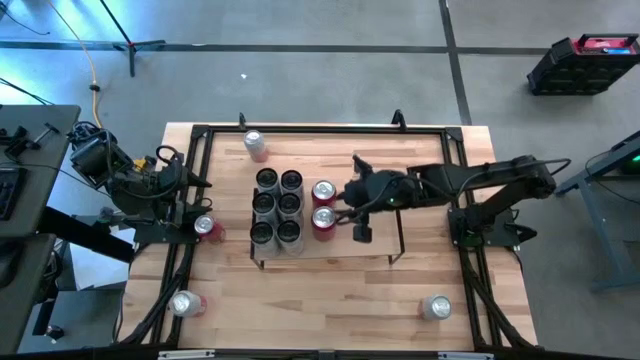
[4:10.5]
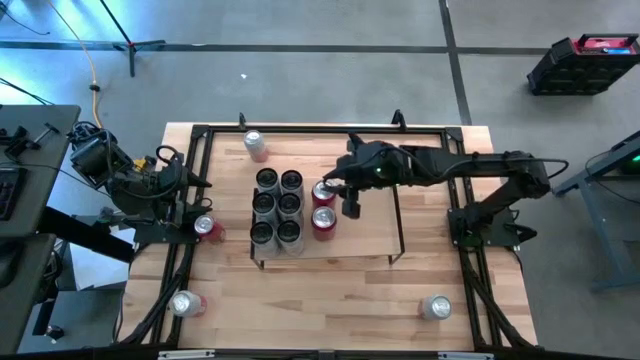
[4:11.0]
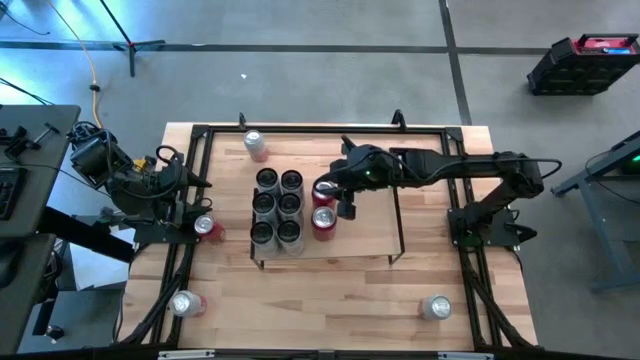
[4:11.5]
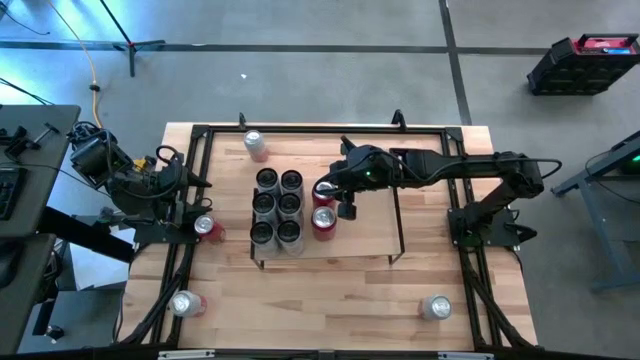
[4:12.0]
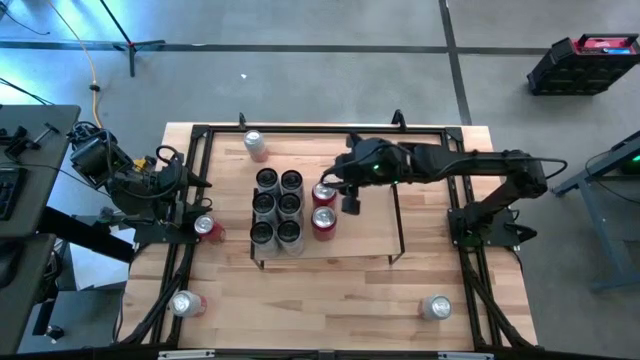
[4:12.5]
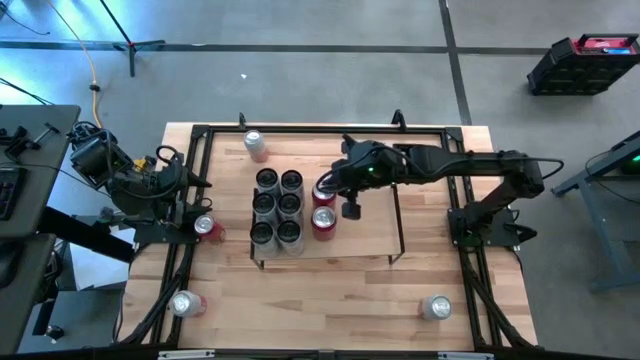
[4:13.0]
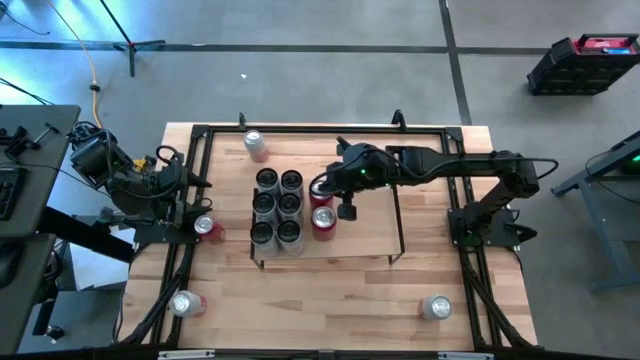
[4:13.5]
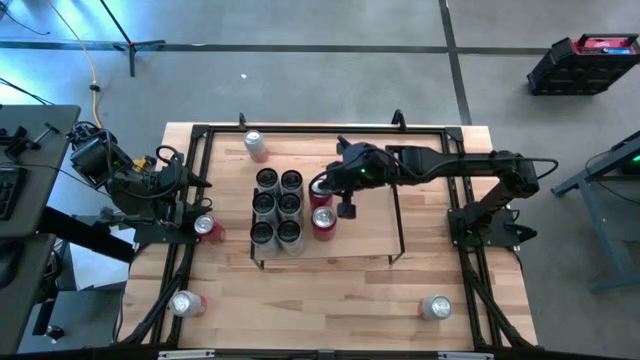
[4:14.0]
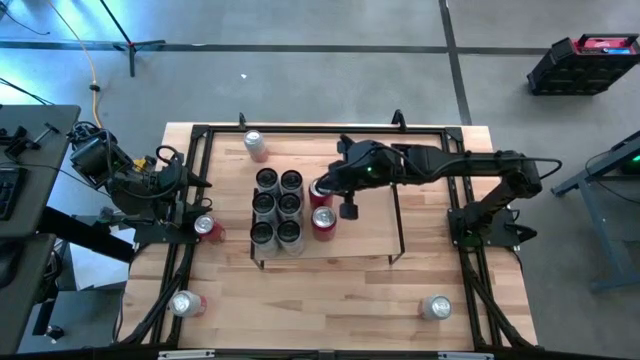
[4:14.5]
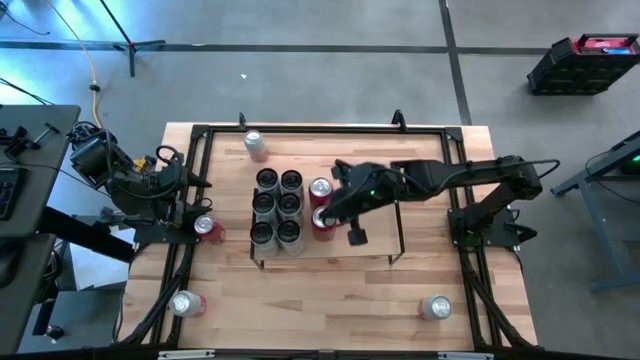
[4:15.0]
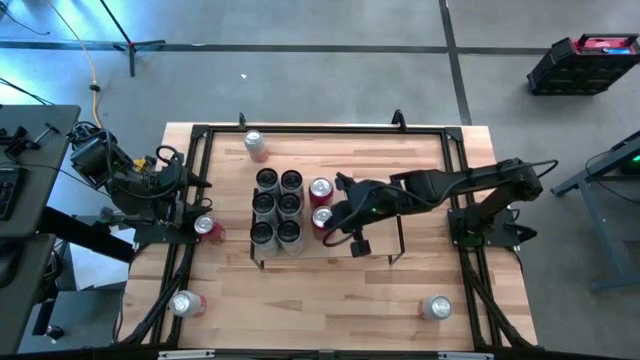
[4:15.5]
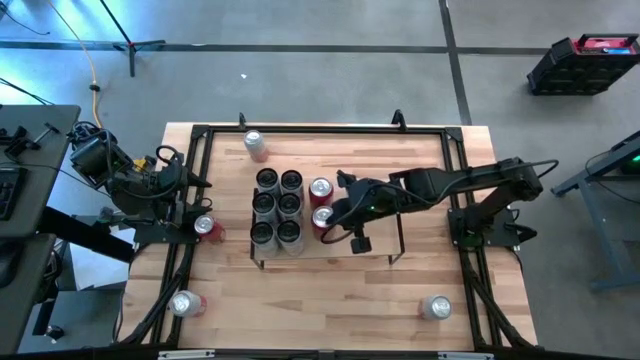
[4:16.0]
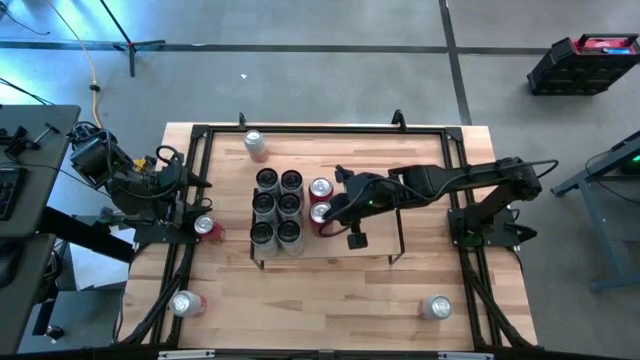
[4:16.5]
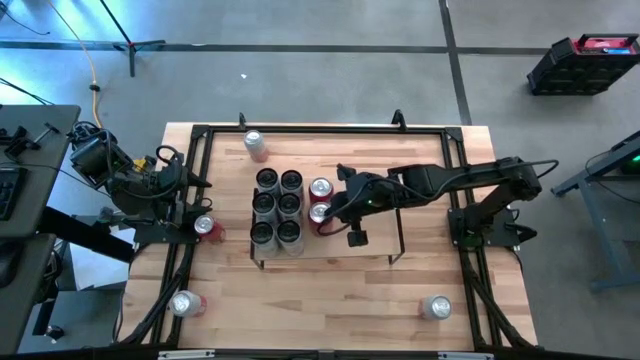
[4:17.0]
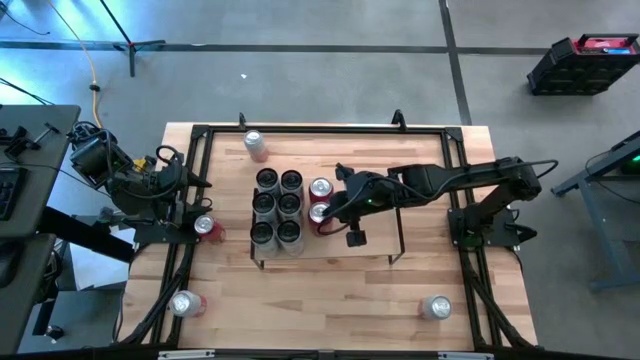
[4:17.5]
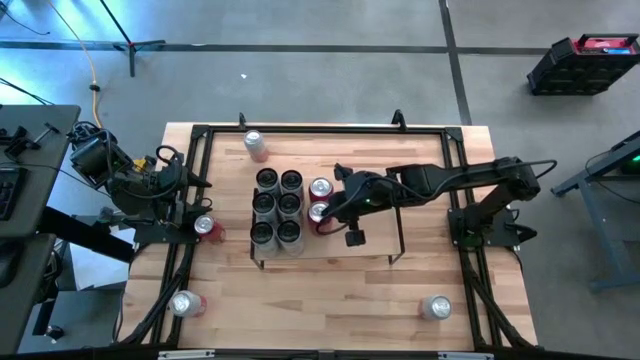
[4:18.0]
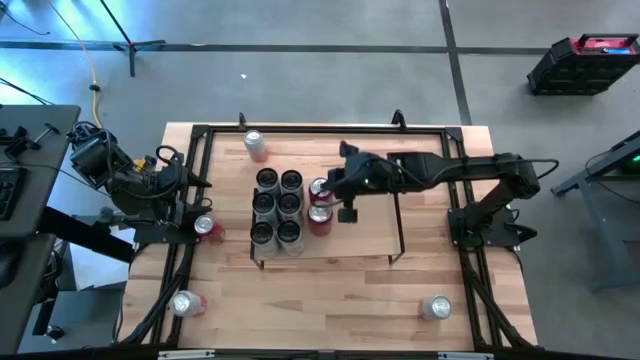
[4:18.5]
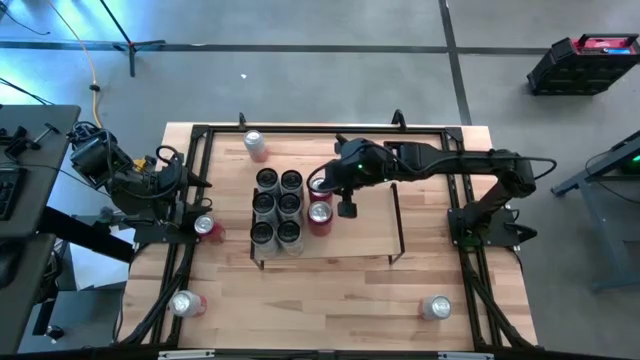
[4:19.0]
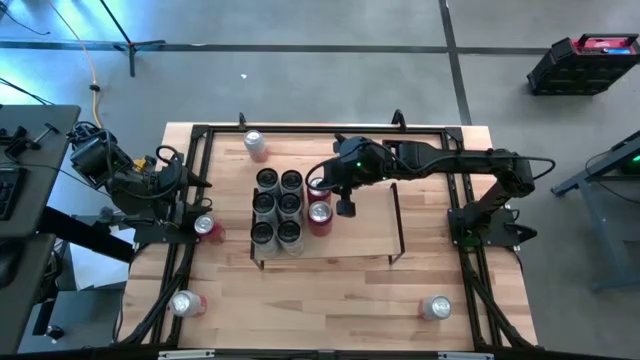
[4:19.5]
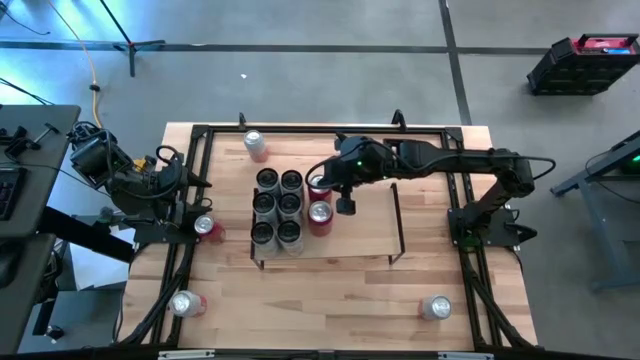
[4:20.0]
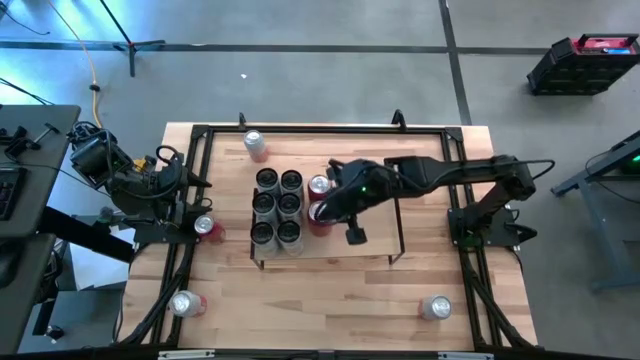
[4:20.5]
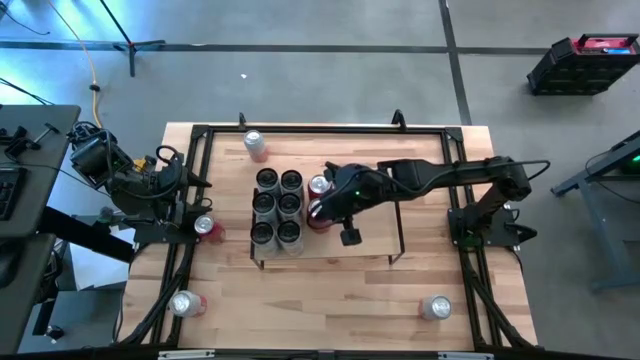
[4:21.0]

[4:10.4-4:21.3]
Task: Place canned beverage on shelf
Adjust the red soda cans on the shelf

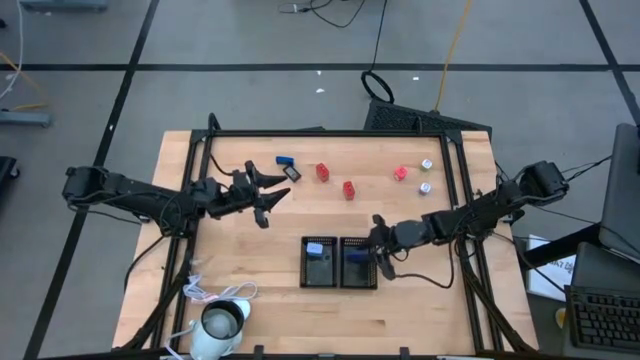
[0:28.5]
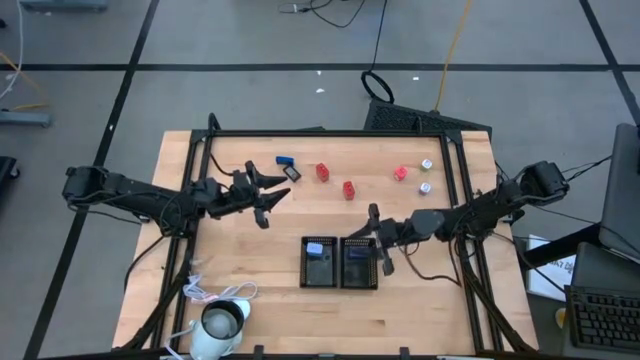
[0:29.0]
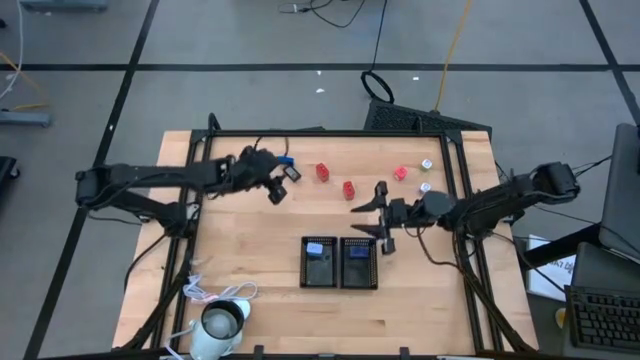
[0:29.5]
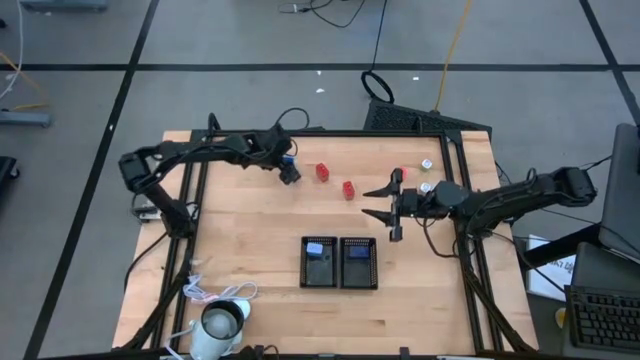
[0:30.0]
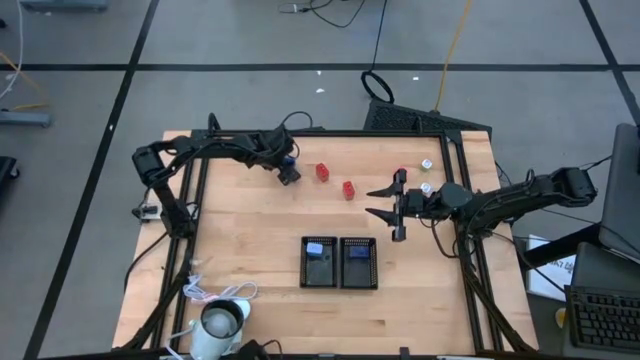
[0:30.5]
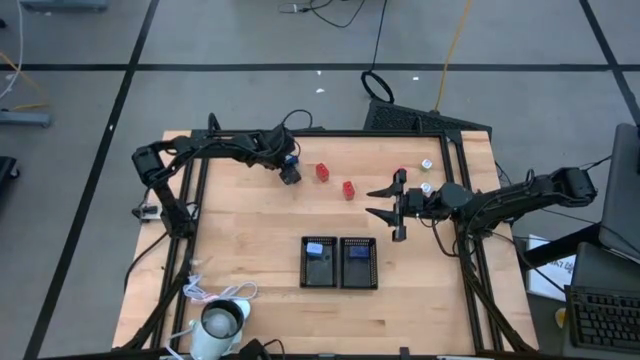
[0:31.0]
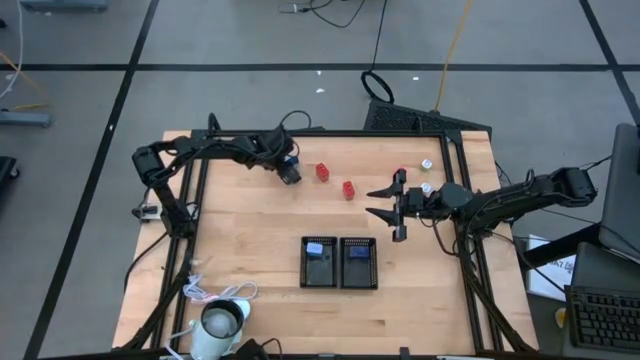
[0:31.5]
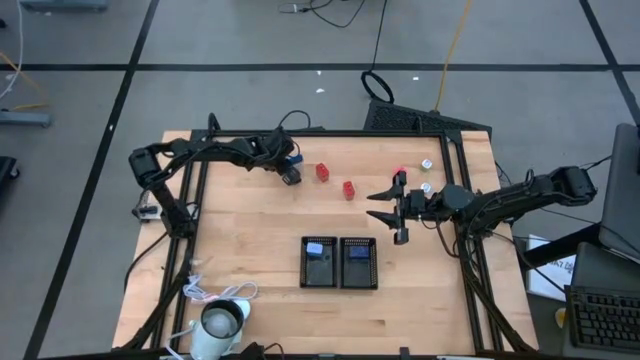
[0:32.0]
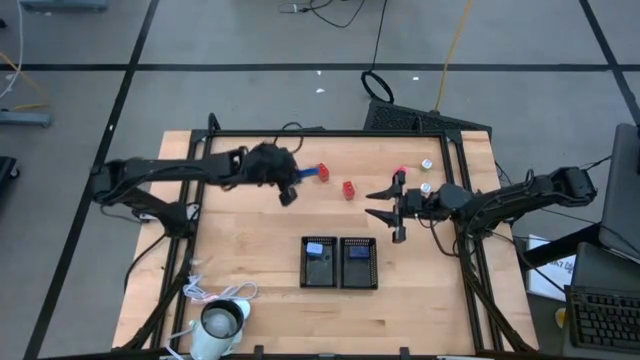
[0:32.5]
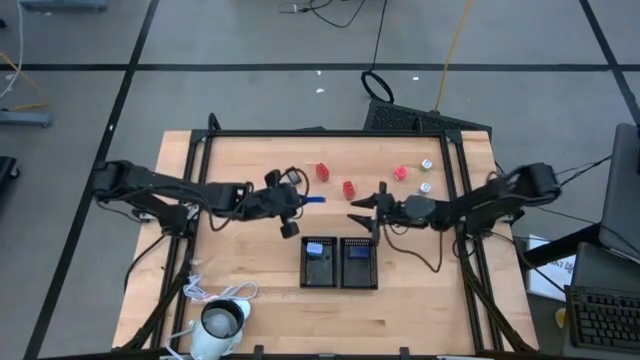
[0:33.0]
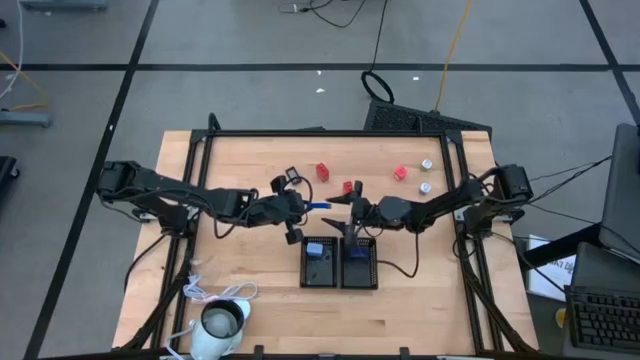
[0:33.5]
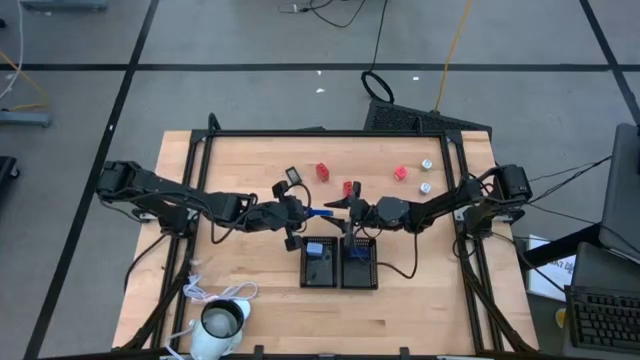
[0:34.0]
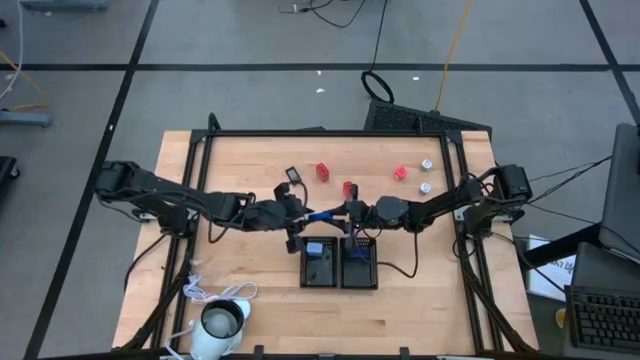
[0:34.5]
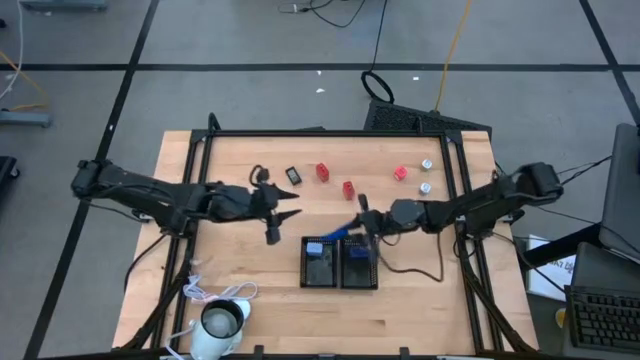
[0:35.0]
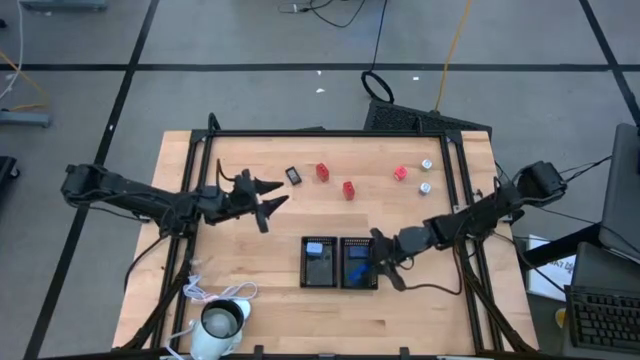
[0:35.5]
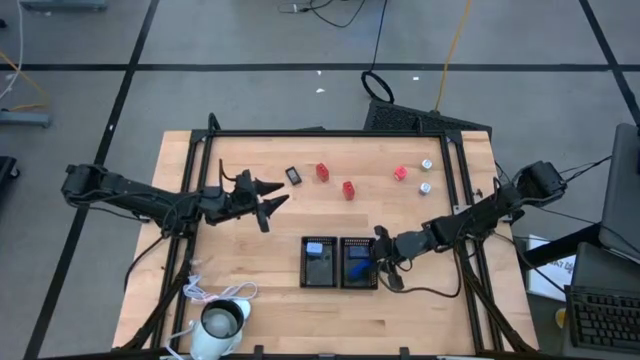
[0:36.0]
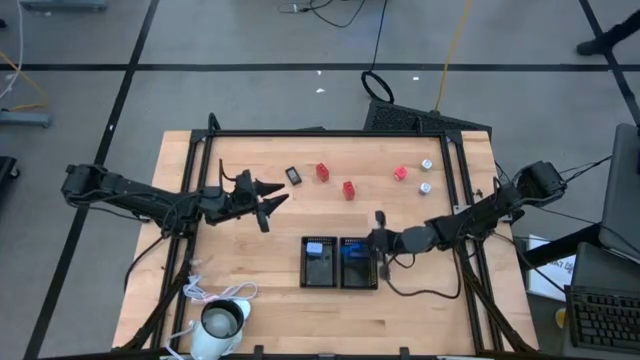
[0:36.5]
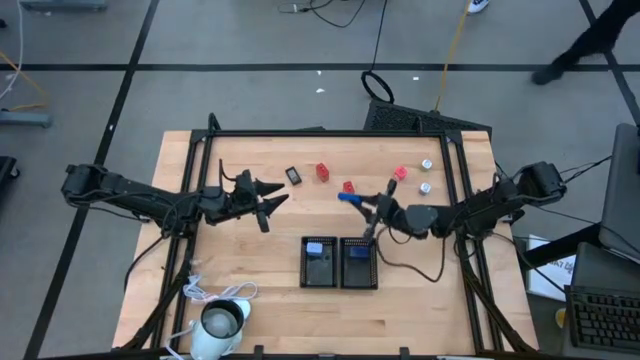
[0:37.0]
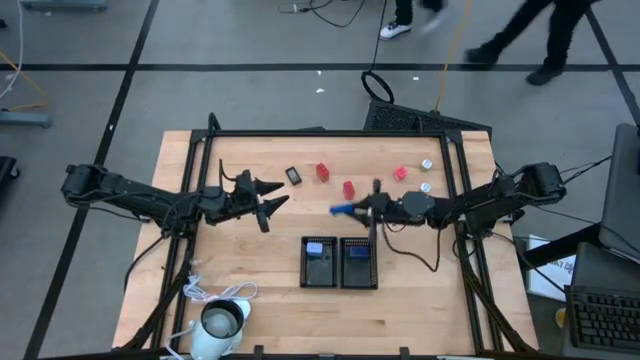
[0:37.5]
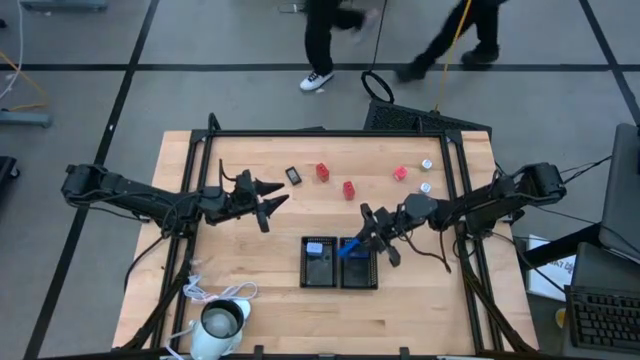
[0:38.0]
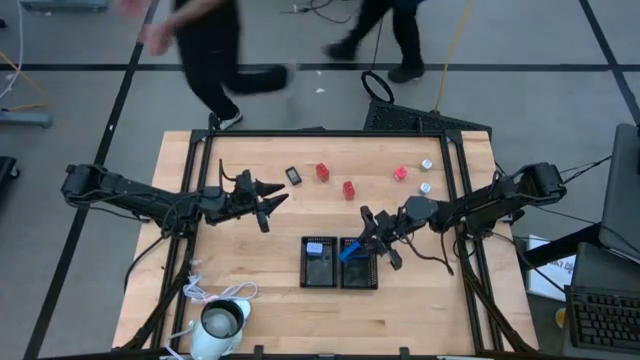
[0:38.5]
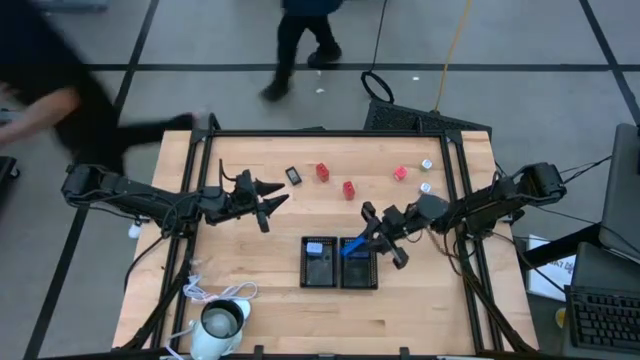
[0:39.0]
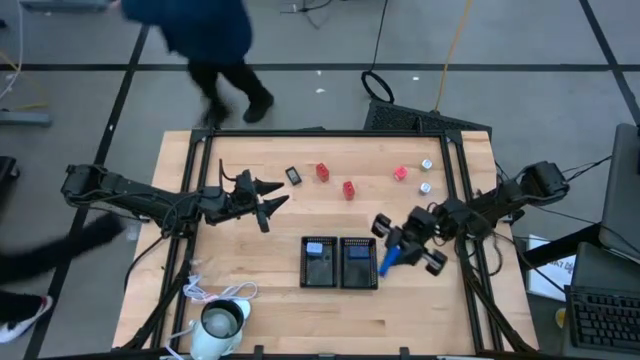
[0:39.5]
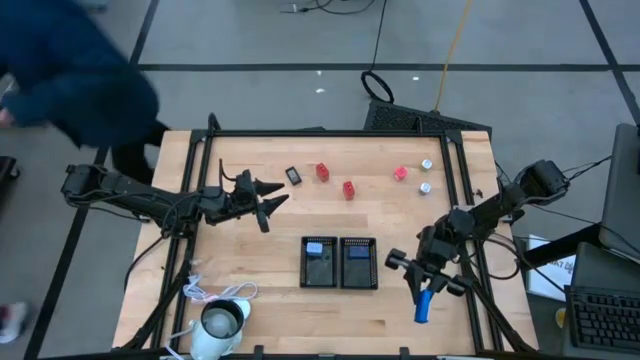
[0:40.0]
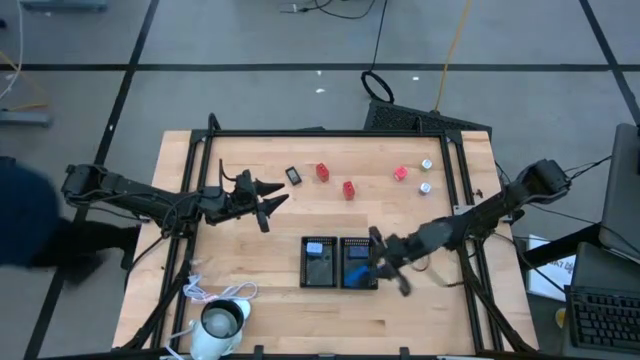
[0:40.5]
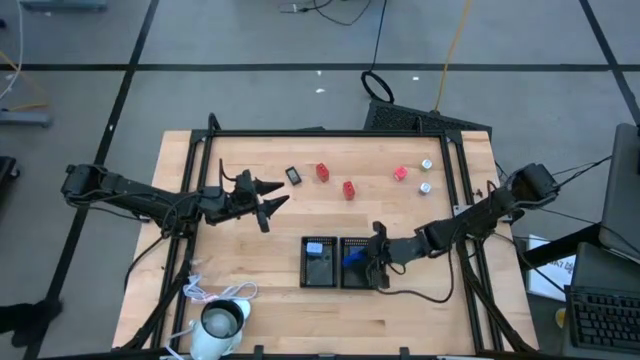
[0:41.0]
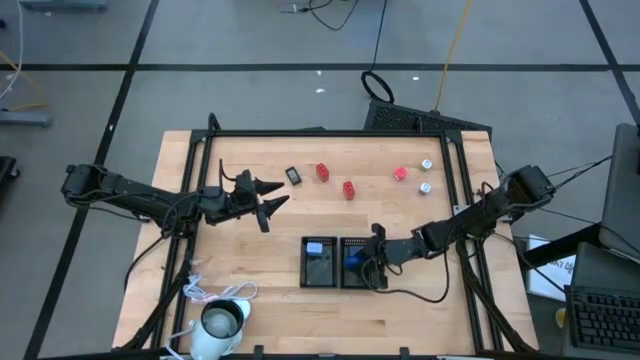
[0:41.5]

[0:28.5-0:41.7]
Task: Pick & Place Office items
Put the blue digital clock into the right black basket
